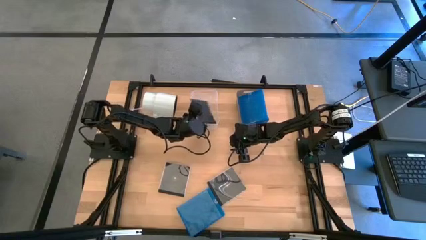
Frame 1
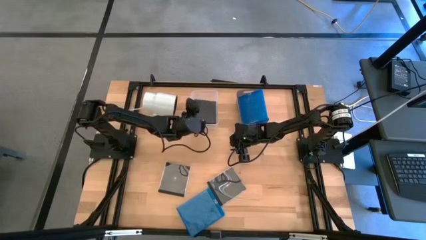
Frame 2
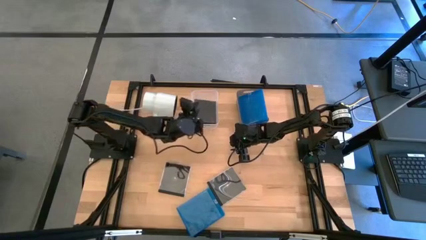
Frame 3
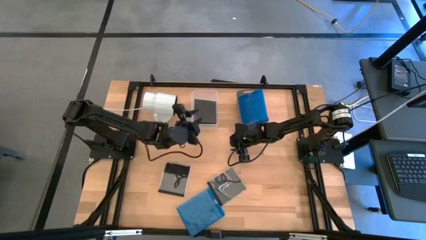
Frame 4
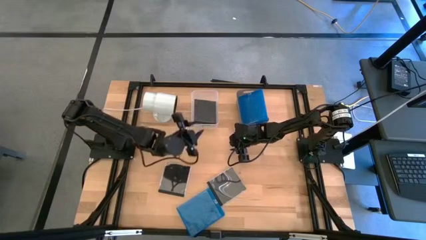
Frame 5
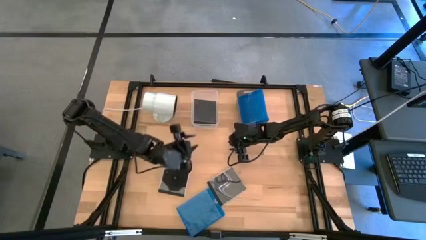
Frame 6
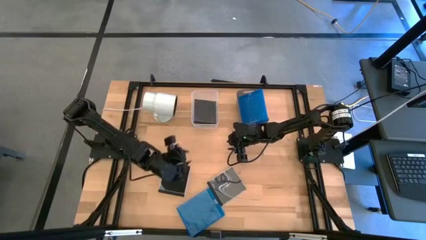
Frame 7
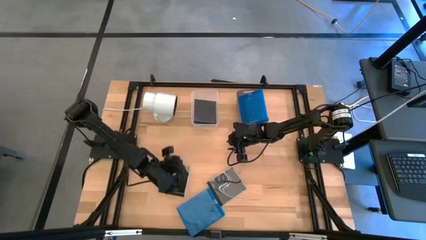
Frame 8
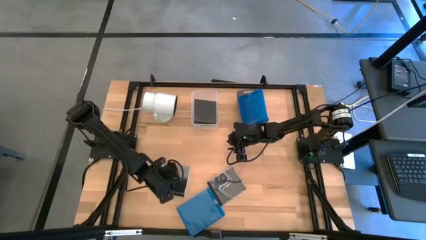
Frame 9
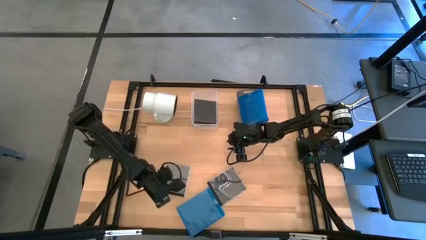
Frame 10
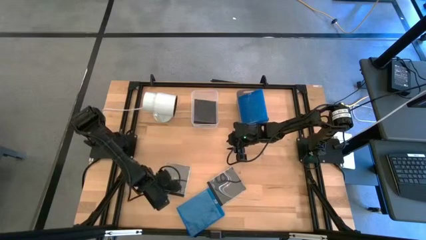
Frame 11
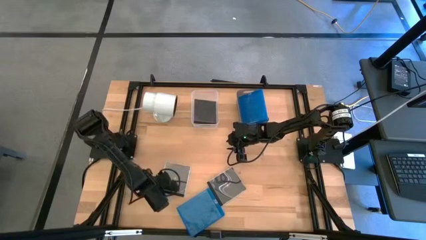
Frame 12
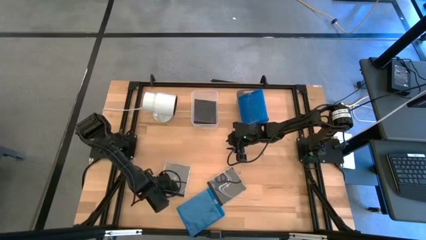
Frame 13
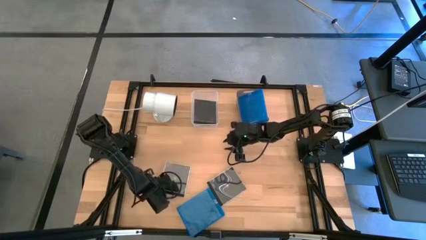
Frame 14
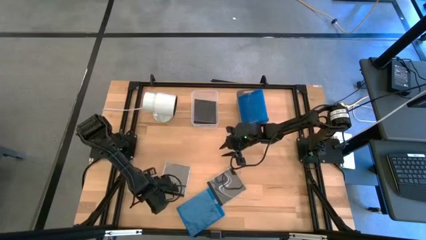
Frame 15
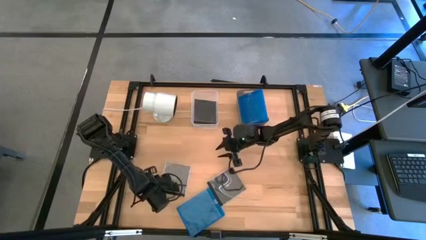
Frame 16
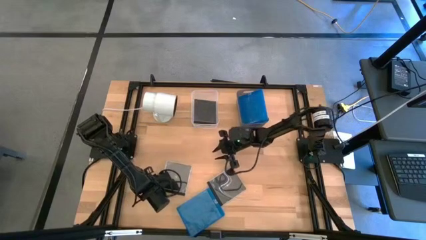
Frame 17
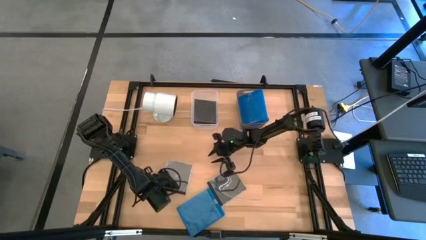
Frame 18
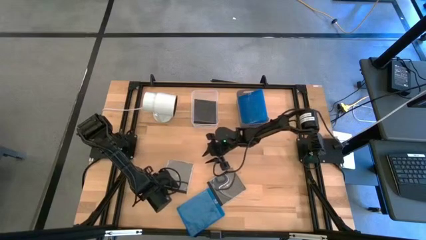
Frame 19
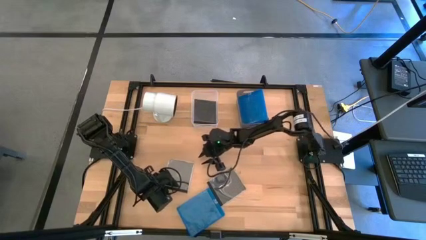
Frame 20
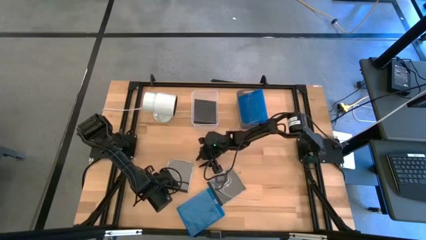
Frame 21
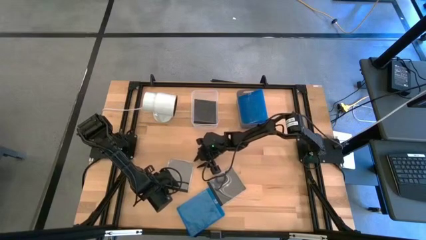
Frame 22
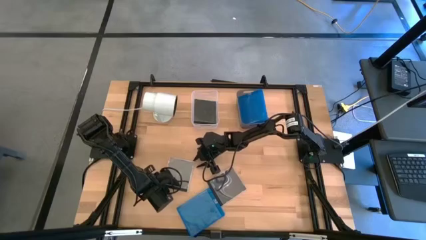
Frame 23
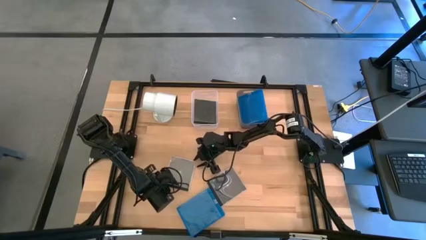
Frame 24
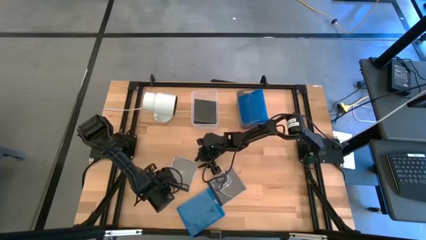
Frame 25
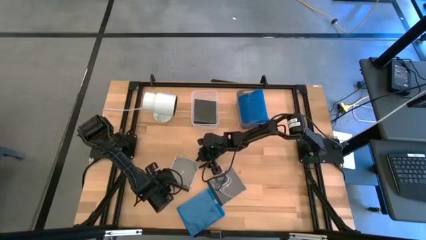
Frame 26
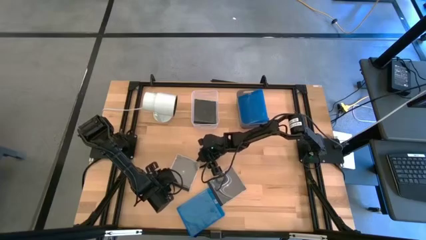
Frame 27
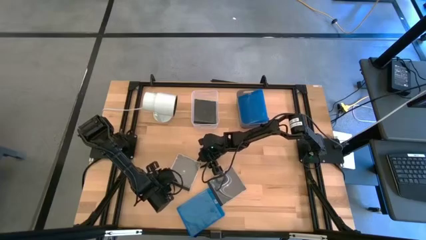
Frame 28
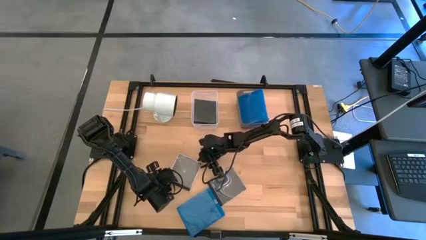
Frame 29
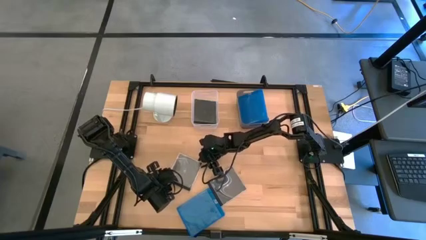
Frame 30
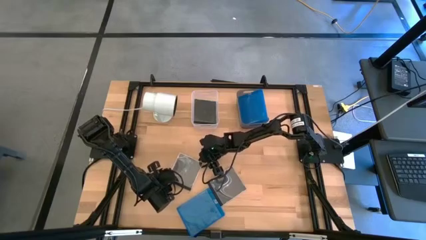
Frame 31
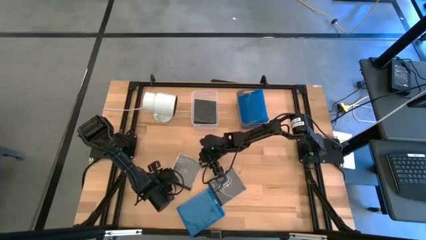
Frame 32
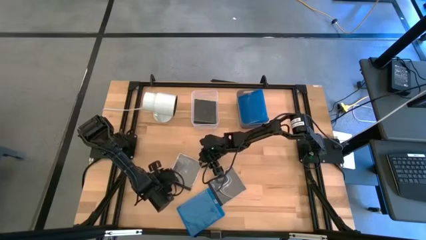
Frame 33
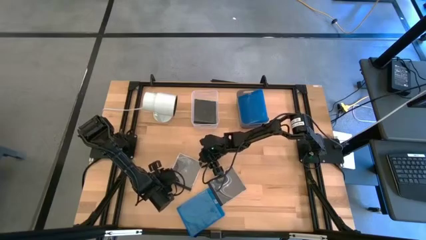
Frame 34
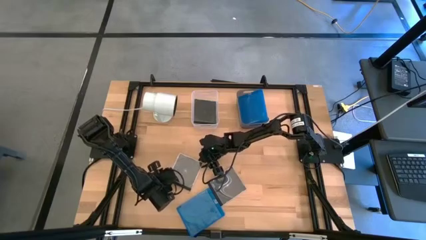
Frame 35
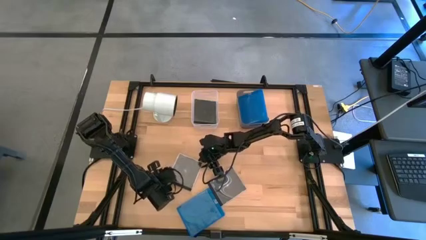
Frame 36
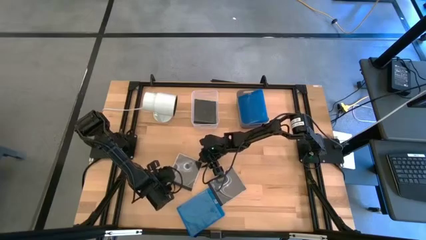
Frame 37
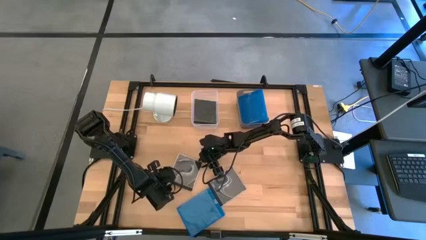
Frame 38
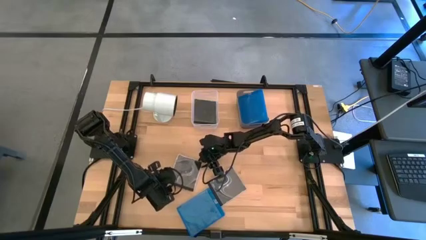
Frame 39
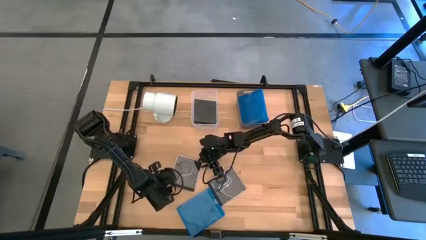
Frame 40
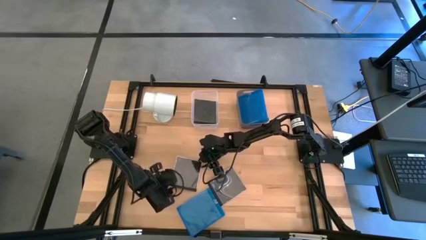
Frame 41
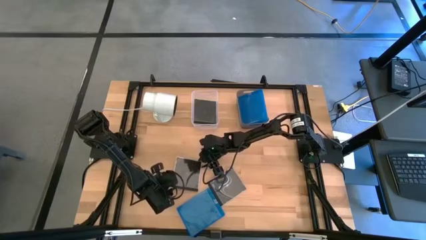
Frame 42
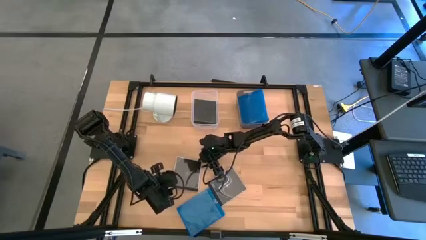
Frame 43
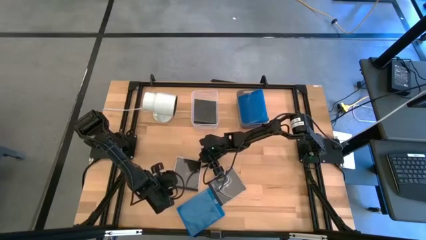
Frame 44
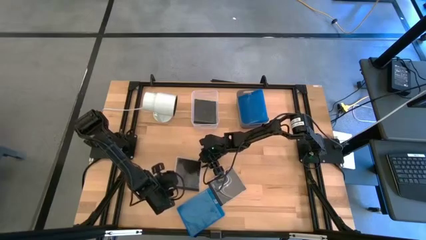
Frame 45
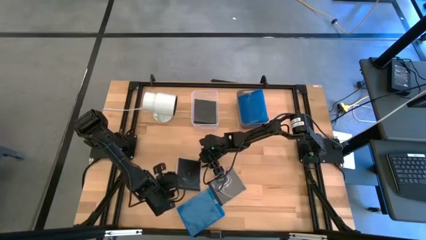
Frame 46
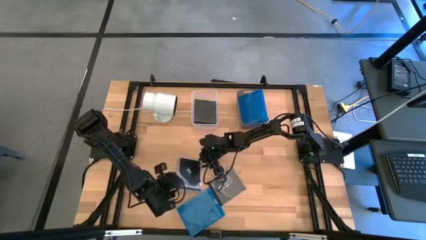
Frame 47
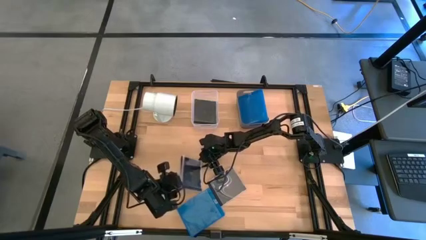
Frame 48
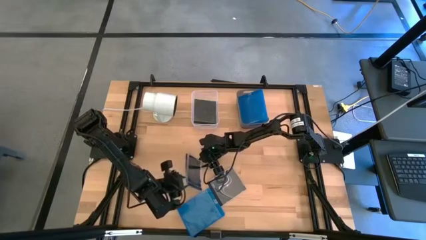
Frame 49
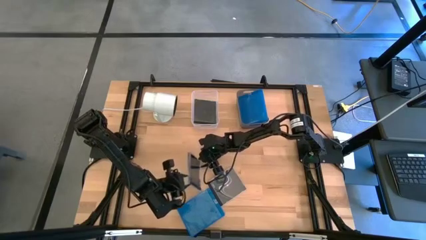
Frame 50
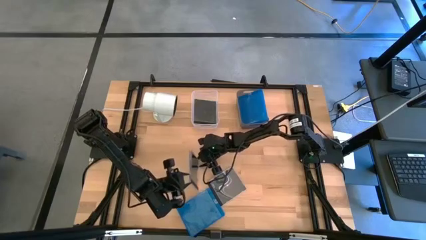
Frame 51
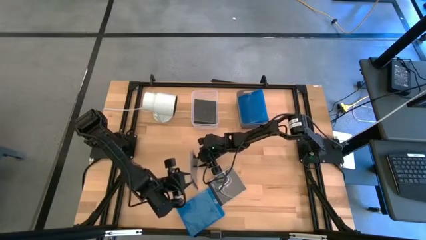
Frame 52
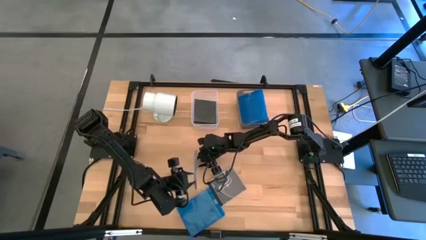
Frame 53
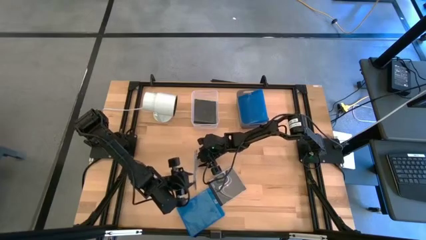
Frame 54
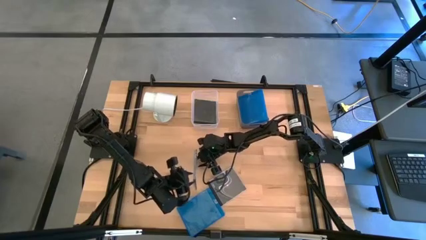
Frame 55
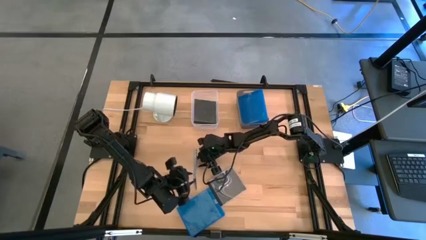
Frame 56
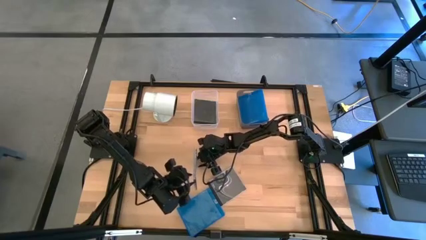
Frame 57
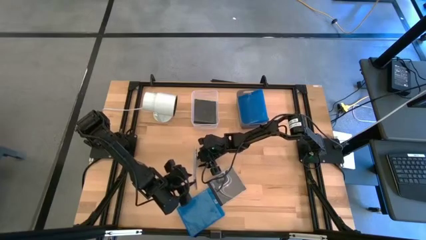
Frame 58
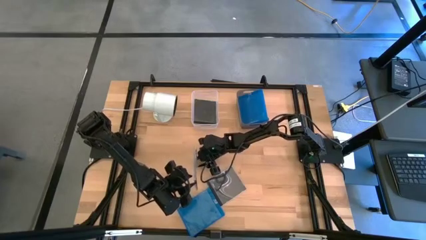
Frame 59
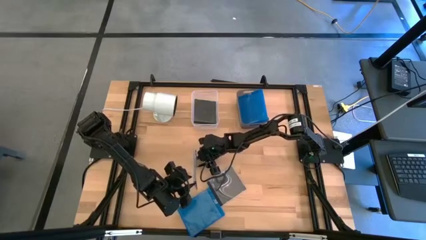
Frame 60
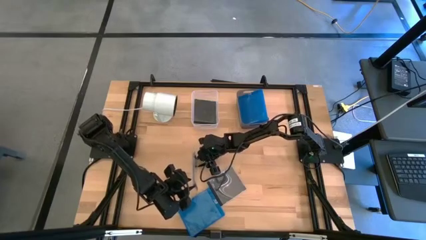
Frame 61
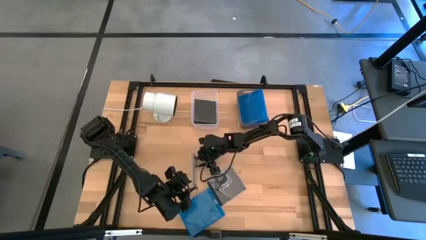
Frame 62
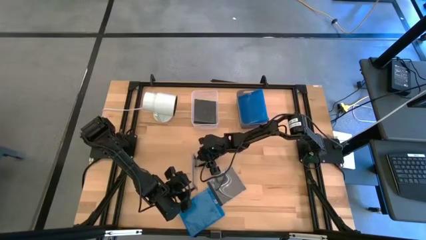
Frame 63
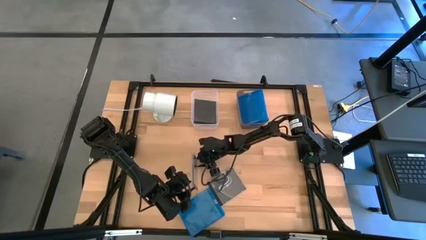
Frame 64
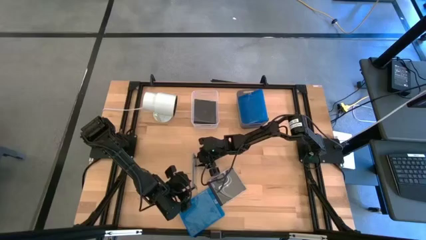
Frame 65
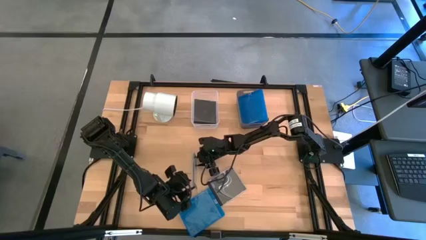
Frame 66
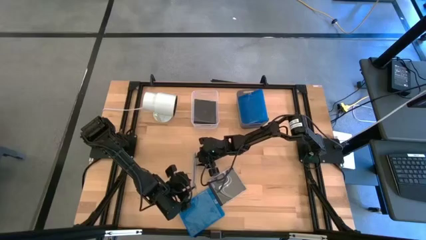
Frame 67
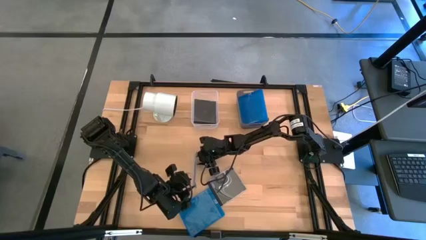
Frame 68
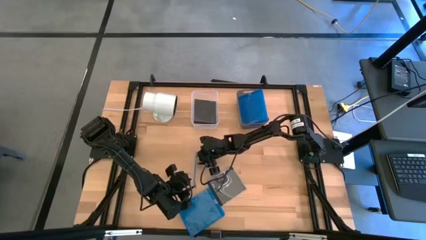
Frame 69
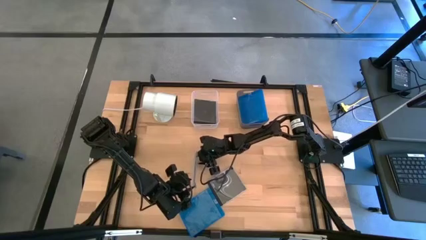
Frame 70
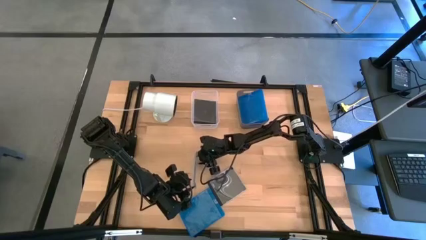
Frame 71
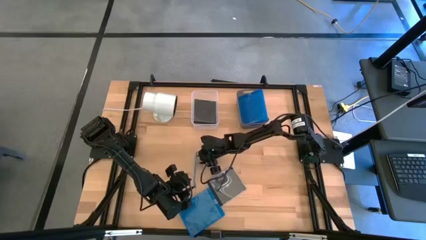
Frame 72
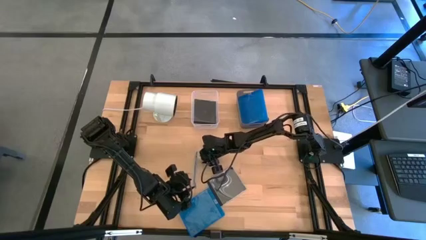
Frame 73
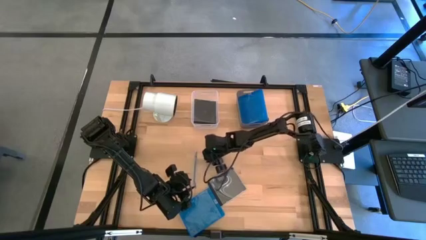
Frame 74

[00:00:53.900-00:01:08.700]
Task: Pick & place jewel cases by type
Put the left black cd case into the white bin

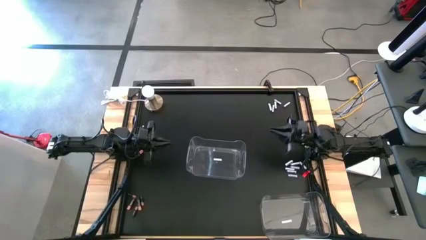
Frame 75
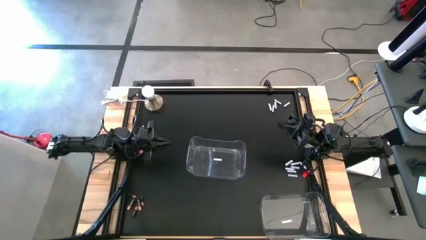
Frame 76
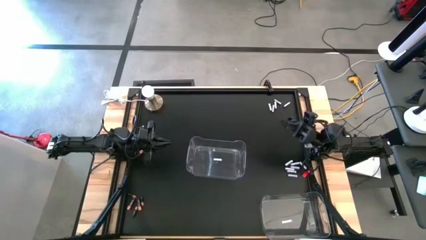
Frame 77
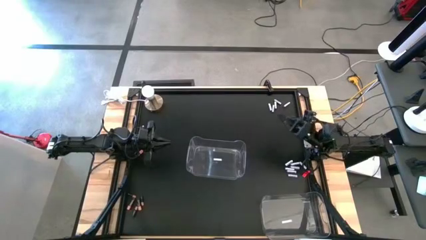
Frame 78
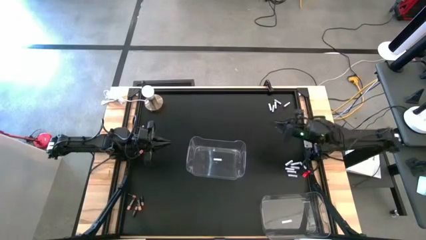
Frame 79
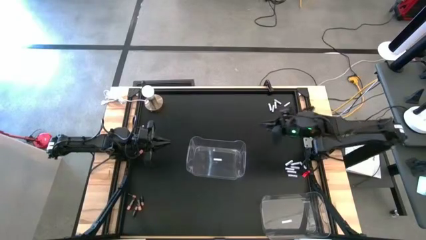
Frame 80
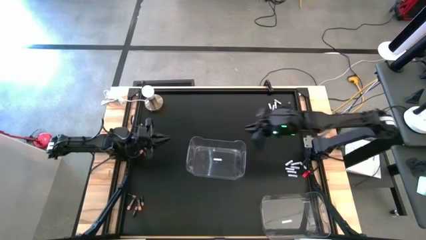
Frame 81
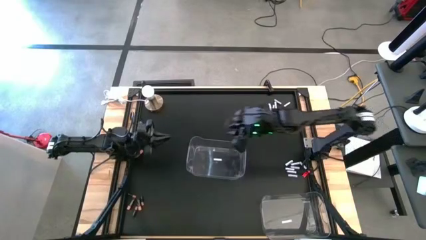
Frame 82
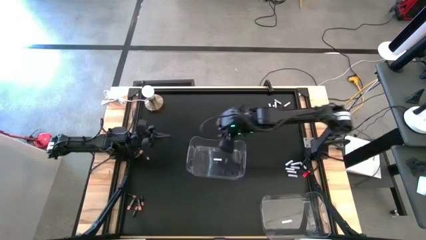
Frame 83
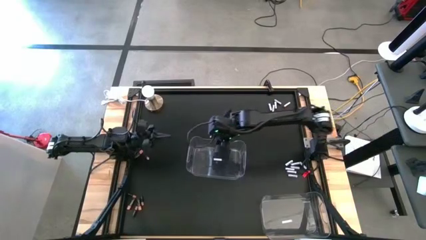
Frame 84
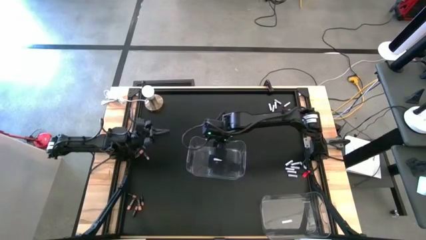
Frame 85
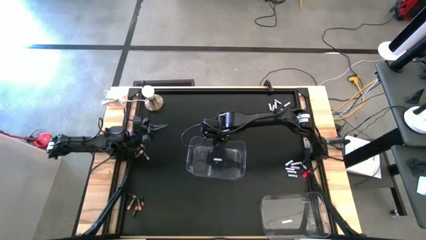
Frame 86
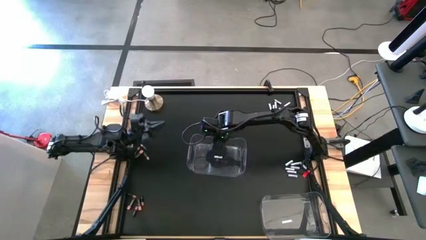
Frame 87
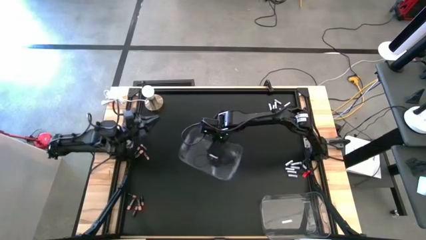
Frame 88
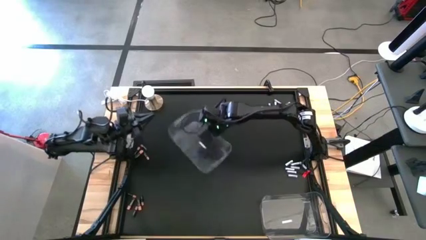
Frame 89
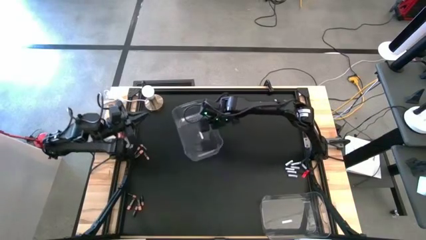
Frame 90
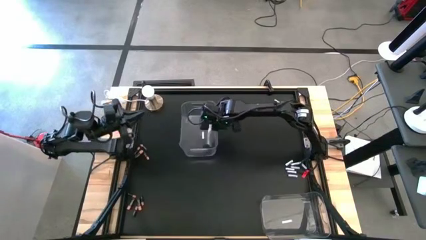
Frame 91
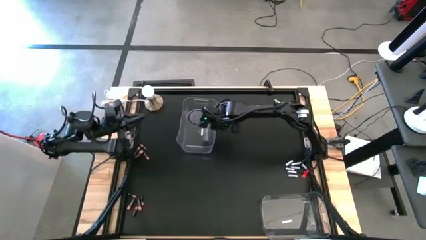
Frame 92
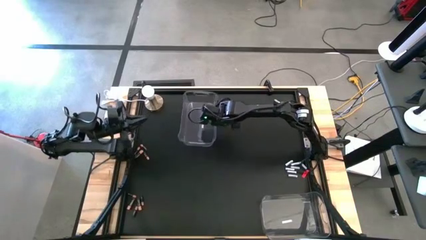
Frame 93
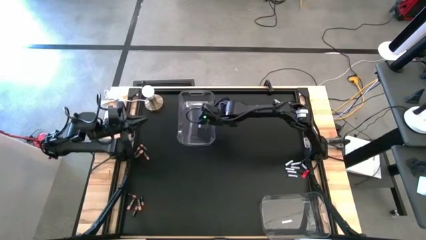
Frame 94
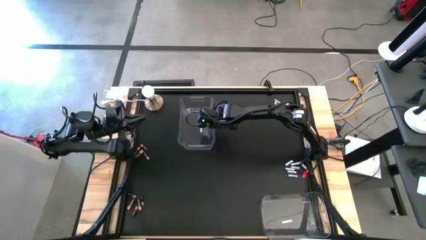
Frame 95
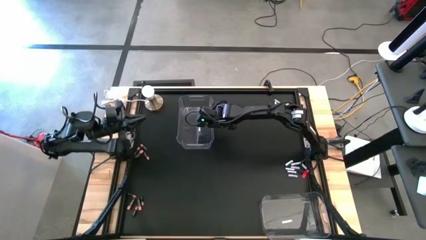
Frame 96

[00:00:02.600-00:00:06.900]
Task: Sort batteries
Move the top transparent bin to the top left of the table
